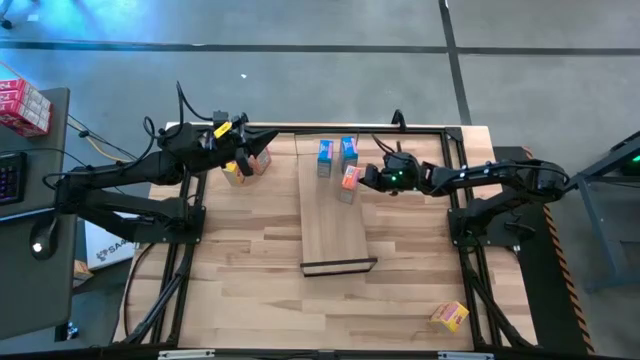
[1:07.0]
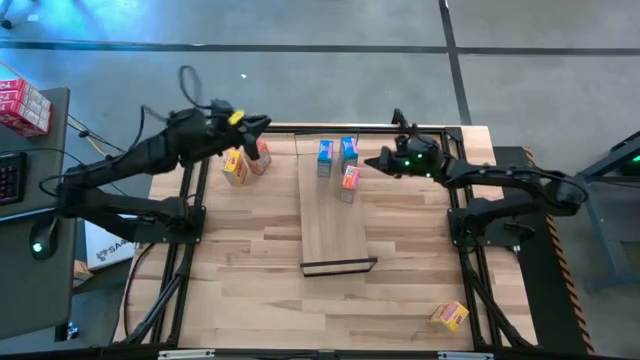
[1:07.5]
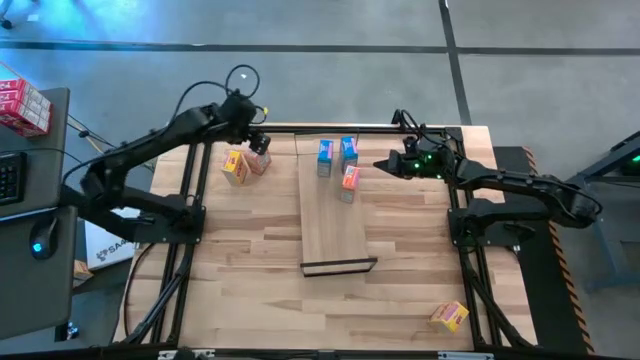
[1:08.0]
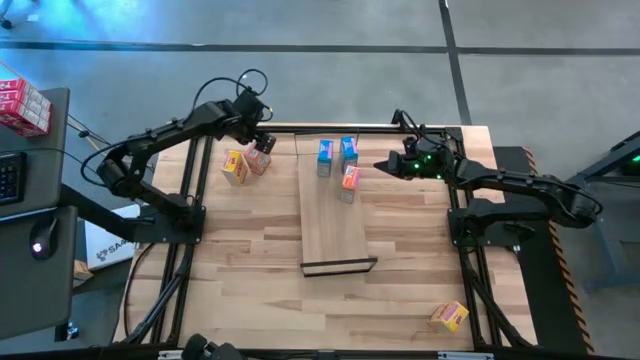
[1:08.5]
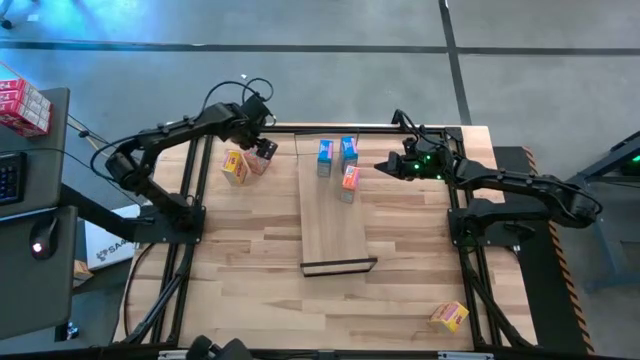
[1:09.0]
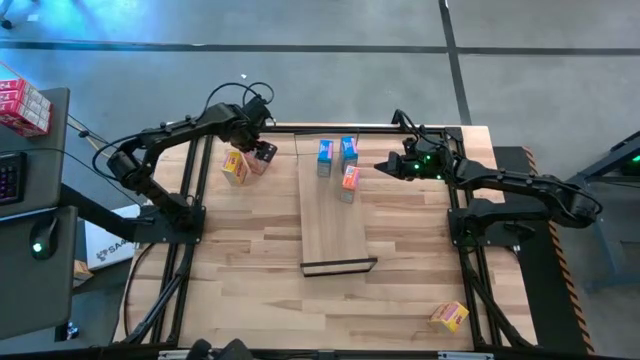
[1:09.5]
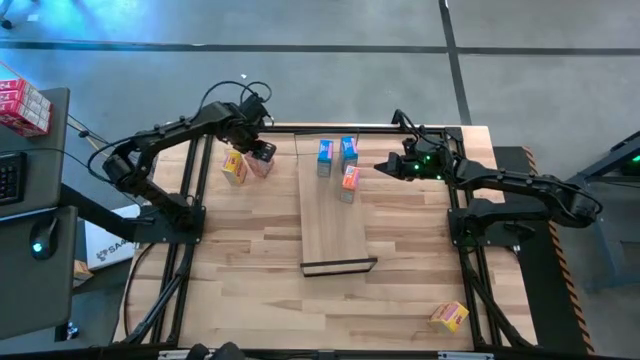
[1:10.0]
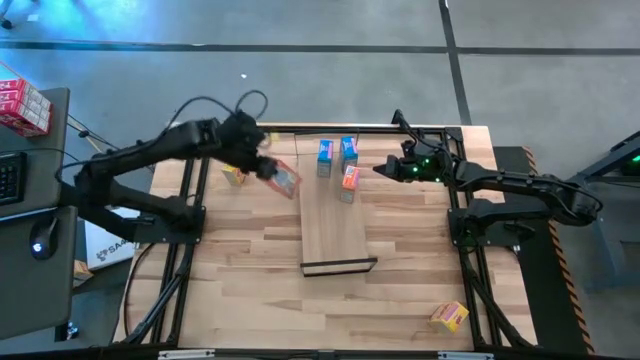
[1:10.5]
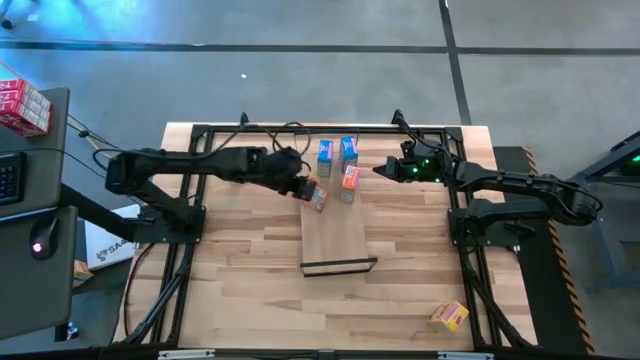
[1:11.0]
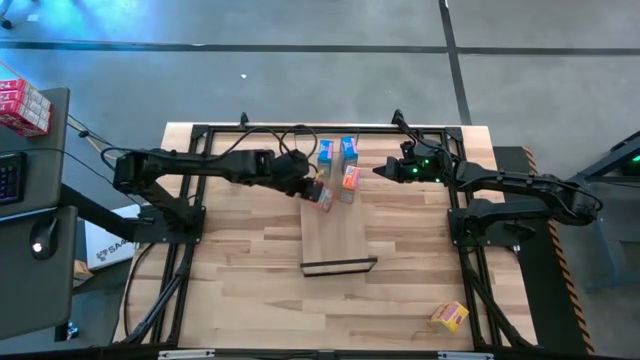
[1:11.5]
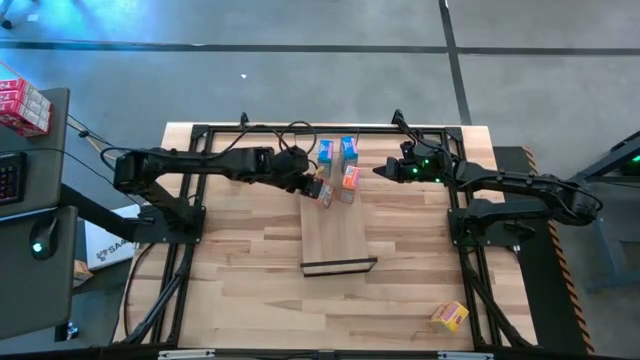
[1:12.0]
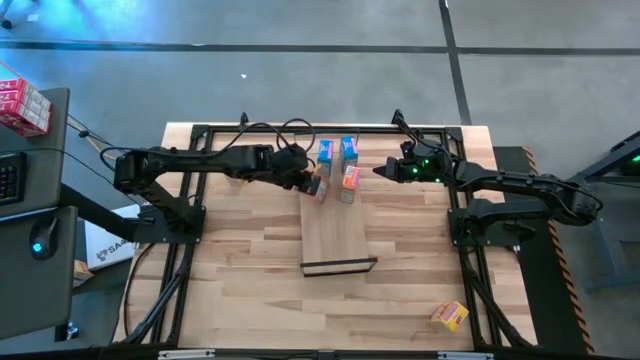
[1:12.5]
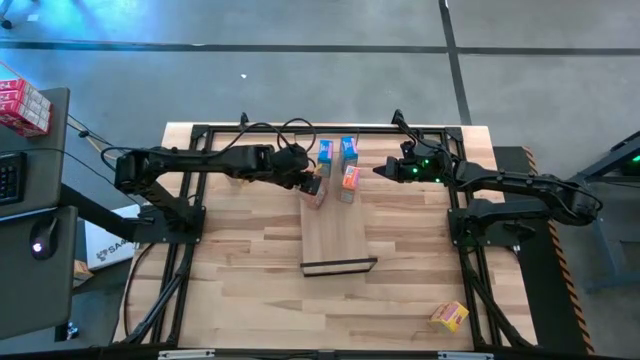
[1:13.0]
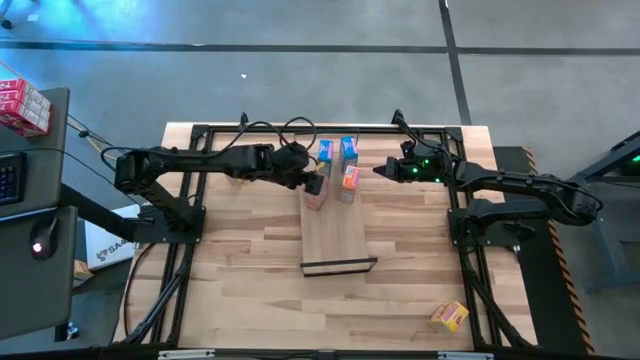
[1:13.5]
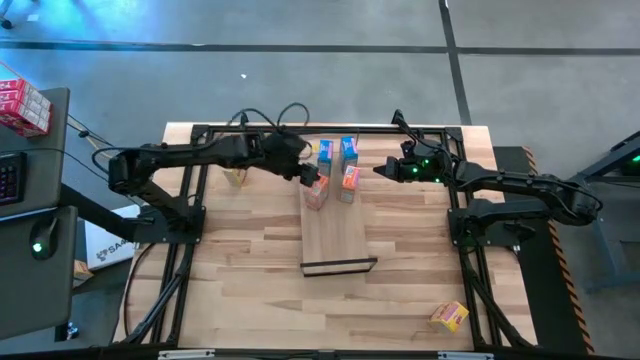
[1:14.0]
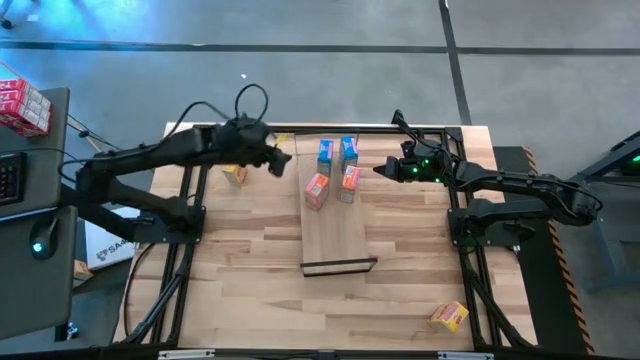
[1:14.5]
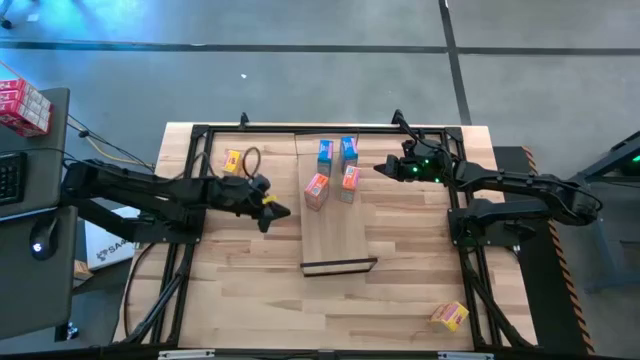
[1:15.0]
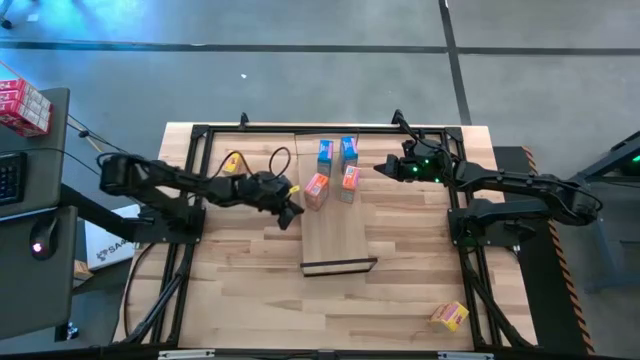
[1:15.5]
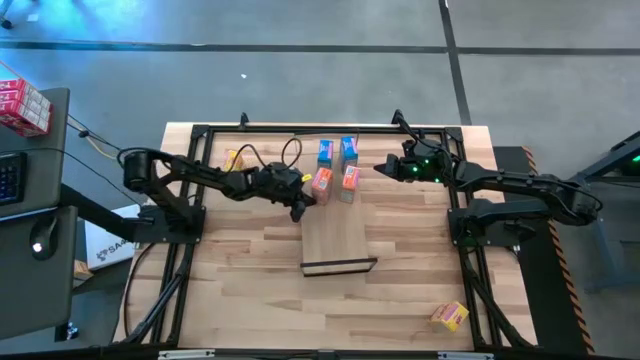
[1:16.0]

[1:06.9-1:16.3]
Task: Stack cereal on shelf
Put the orange cereal box on the shelf aligned with the other orange cereal box

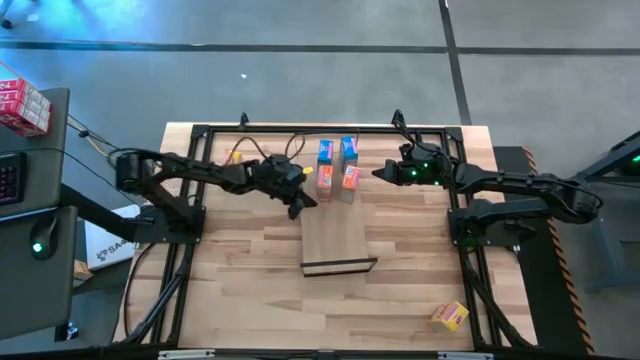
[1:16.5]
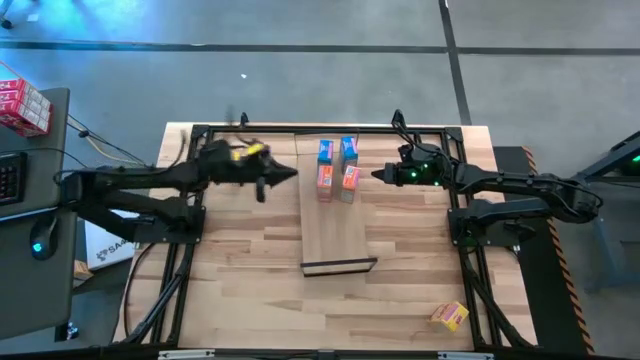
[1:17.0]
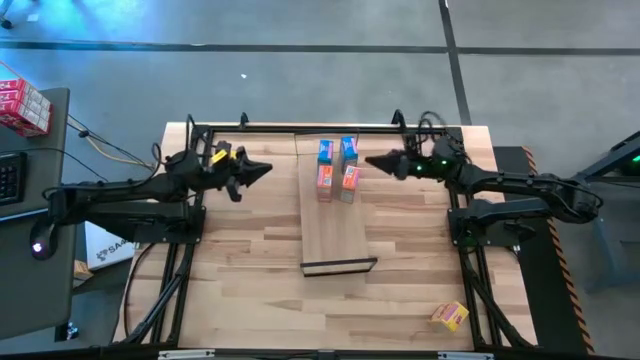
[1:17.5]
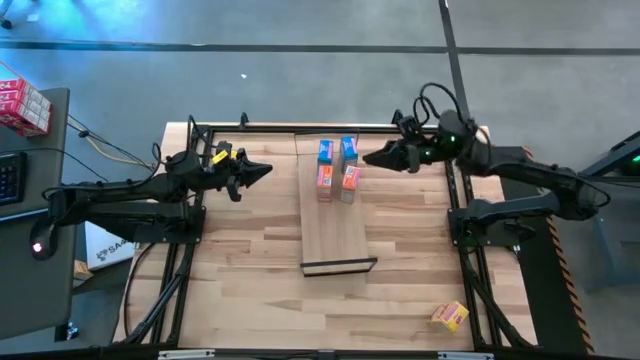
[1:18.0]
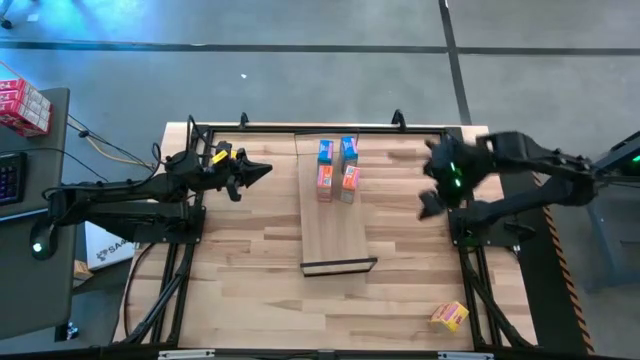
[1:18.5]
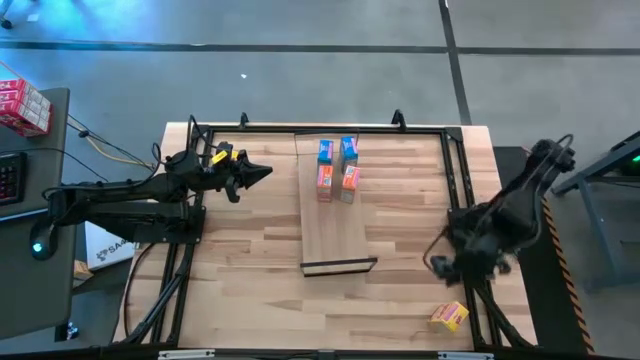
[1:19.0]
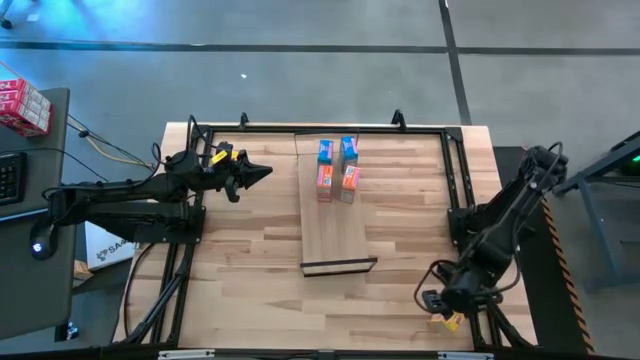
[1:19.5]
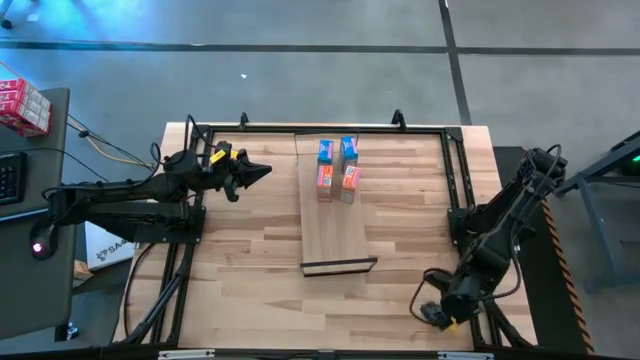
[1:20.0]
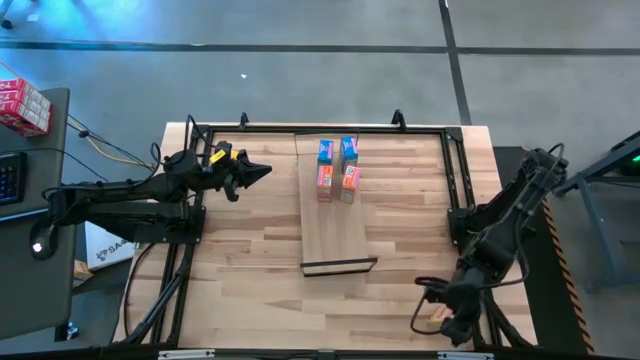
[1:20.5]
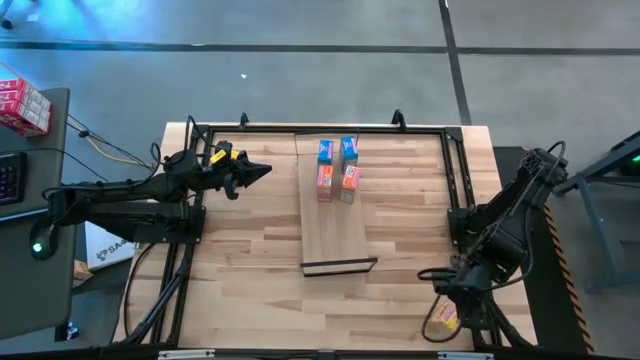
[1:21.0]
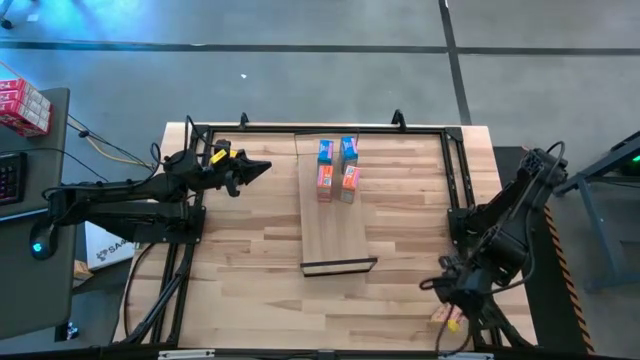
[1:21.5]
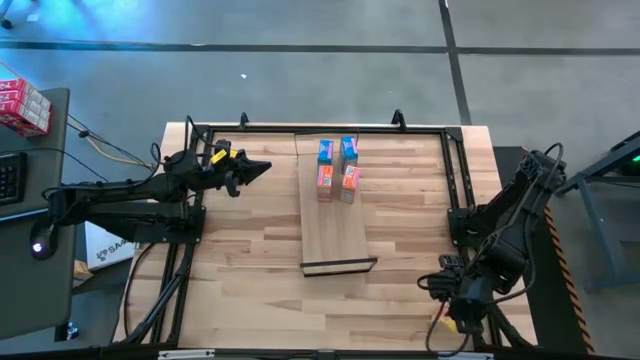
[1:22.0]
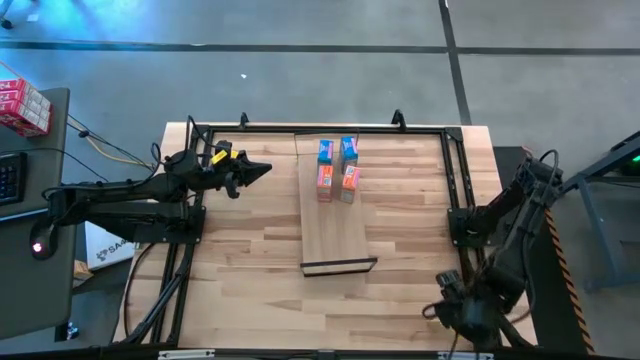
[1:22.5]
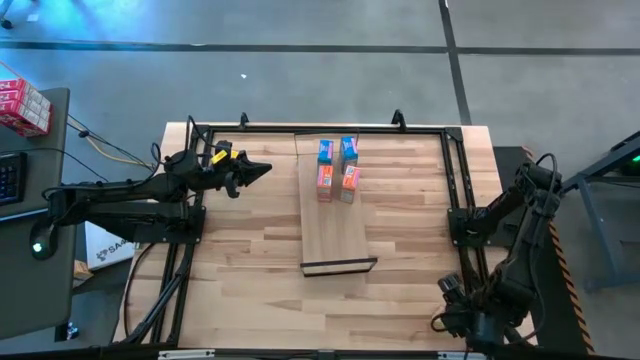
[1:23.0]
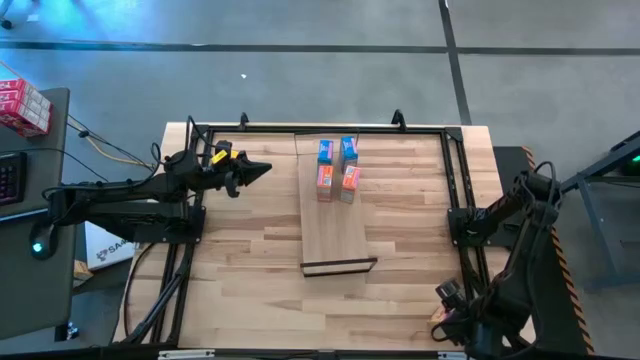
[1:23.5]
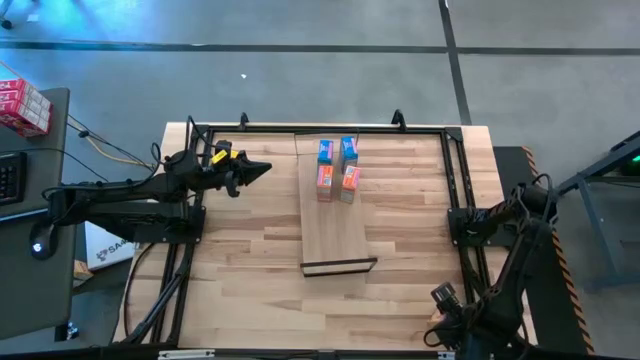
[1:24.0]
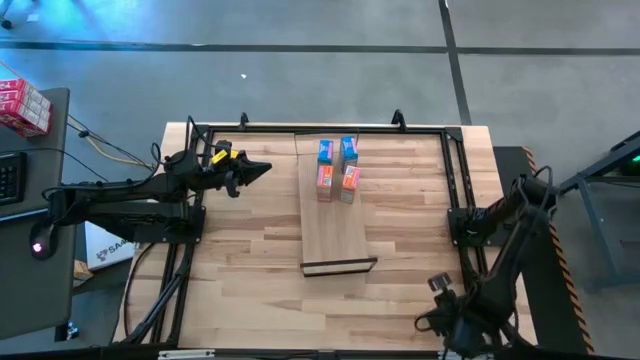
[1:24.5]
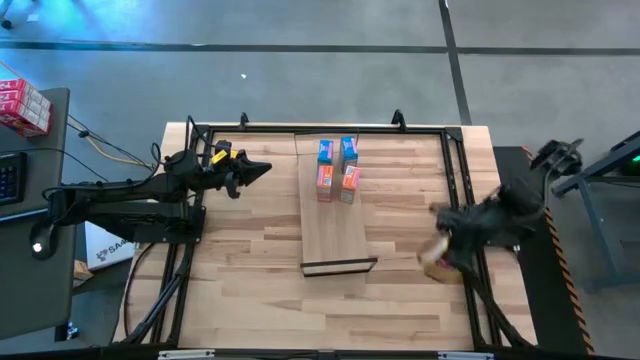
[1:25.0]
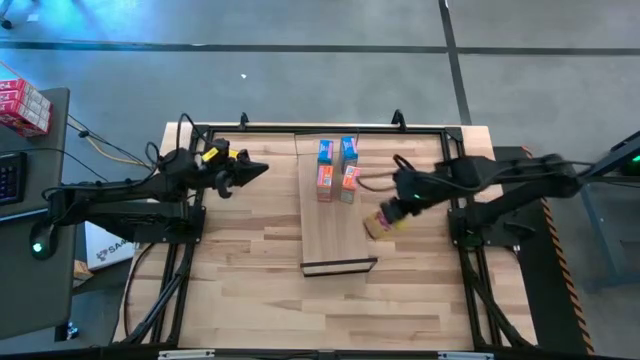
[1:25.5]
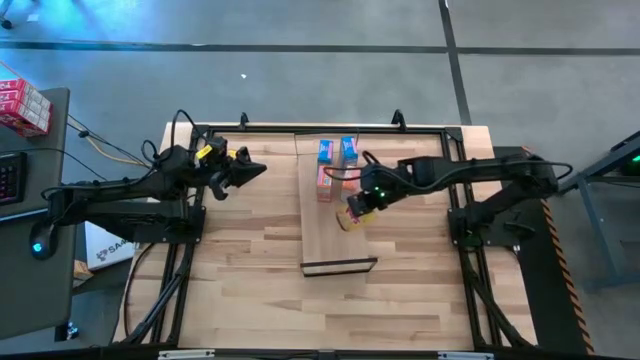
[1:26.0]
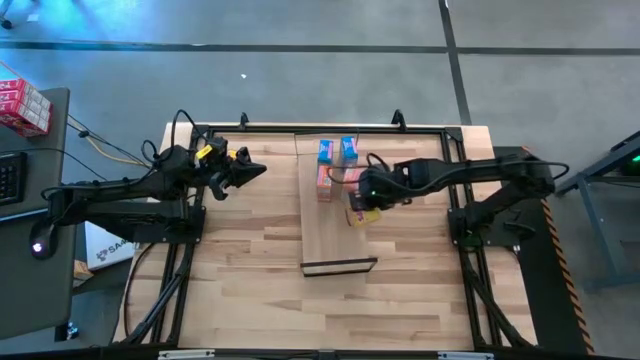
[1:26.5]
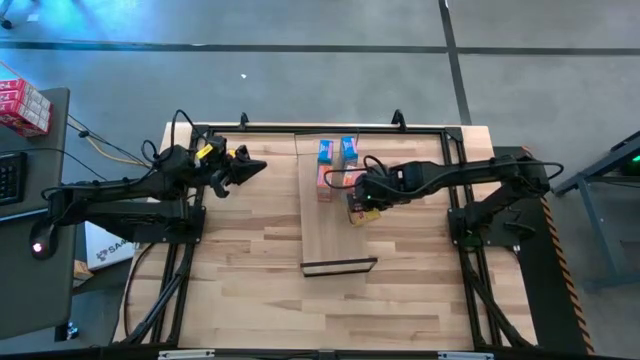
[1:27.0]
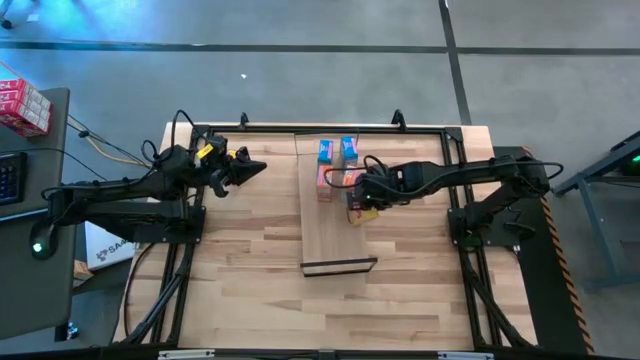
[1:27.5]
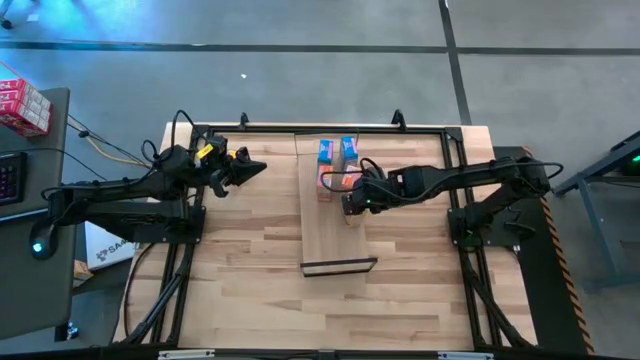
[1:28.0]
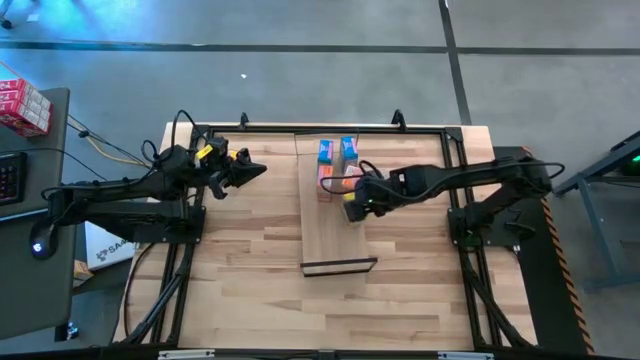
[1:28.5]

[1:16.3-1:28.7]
Put the bottom yellow cereal box on the shelf
